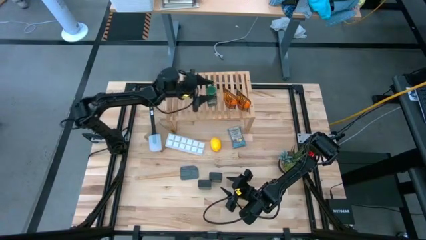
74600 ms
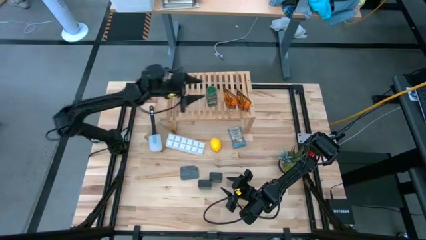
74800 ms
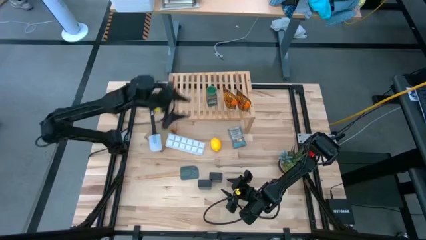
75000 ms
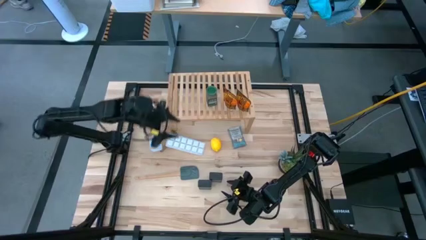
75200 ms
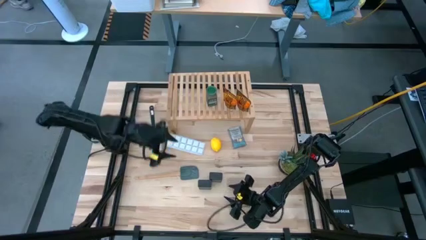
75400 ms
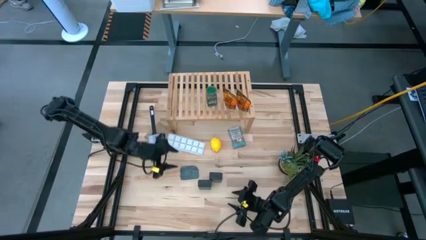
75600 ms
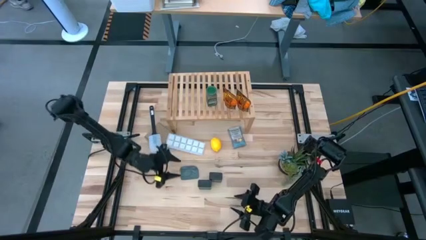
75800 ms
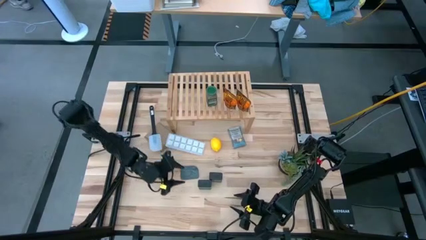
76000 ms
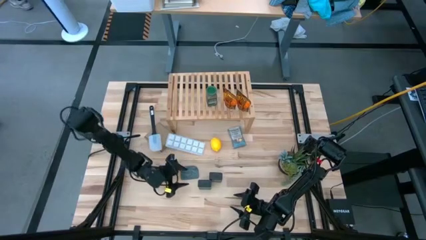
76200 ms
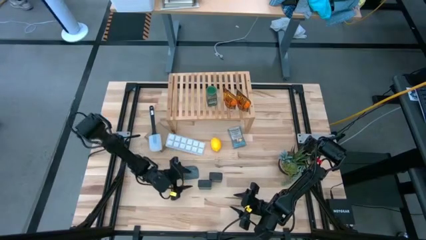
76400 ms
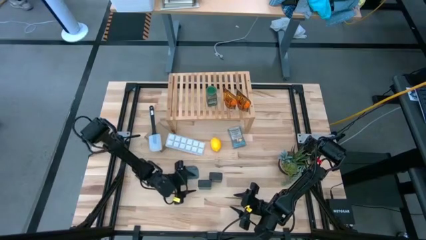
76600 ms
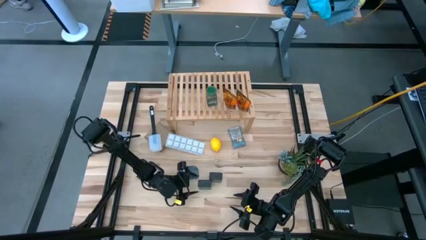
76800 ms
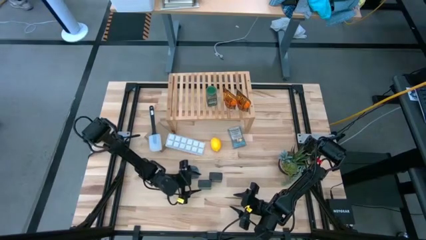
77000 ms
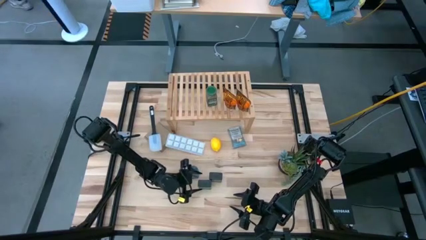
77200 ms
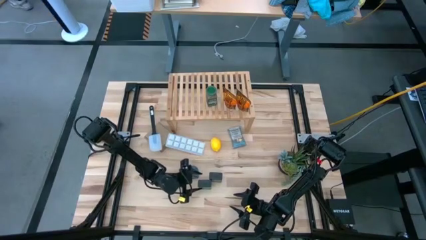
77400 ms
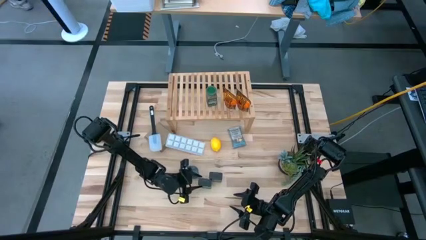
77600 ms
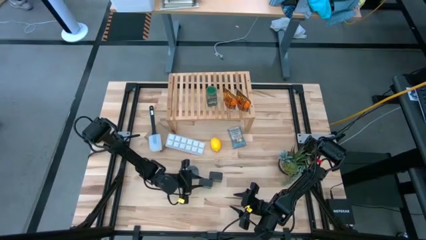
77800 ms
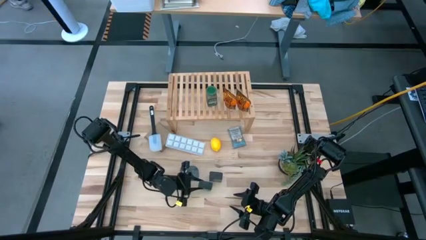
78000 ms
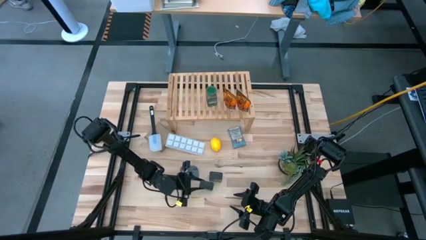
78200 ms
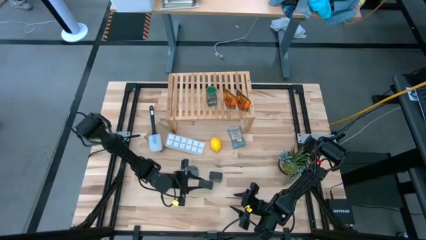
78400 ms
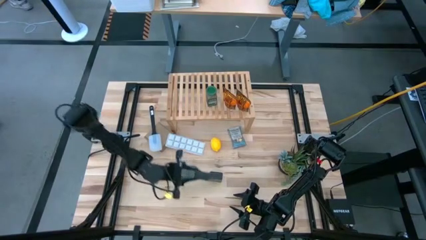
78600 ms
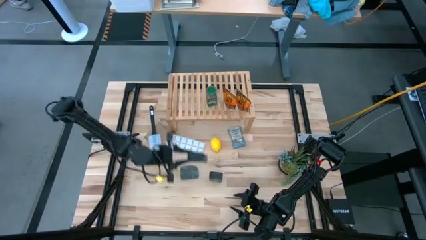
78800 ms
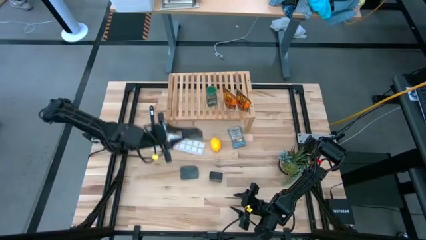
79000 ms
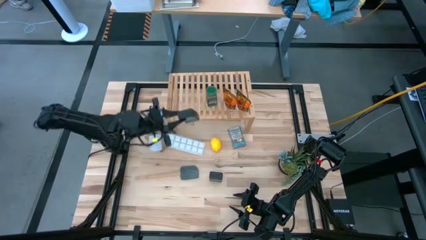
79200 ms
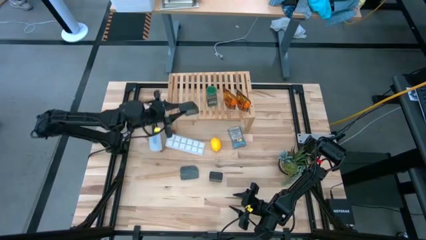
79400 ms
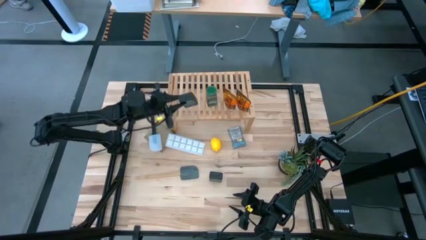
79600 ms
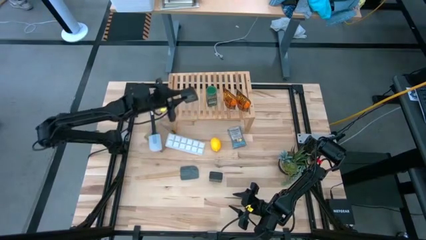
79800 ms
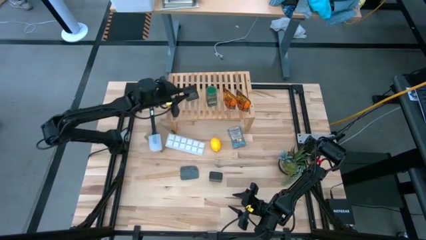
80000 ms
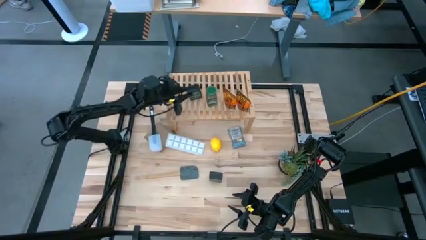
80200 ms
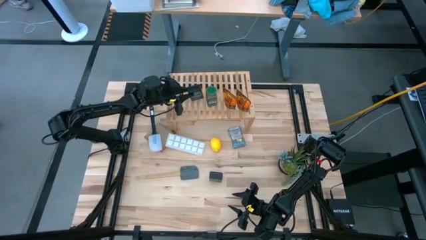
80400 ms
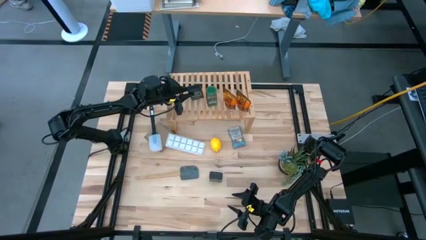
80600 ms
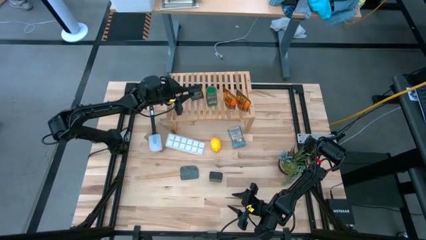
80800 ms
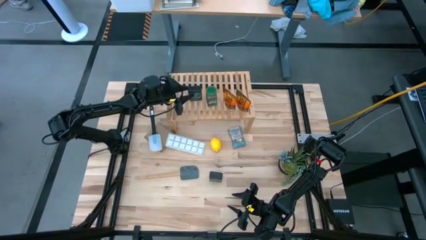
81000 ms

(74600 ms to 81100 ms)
Task: Shelf spices
Put the left green seasoning container on the shelf

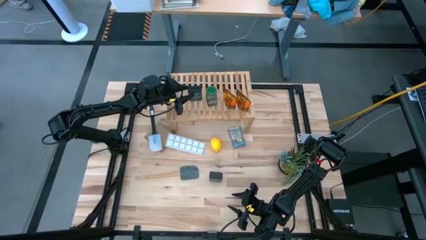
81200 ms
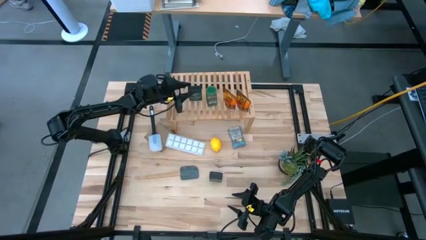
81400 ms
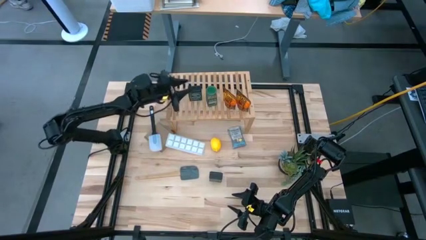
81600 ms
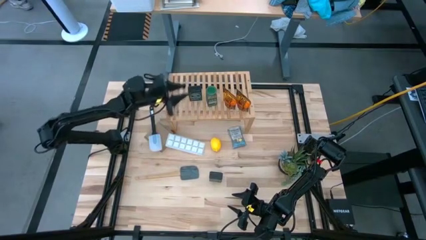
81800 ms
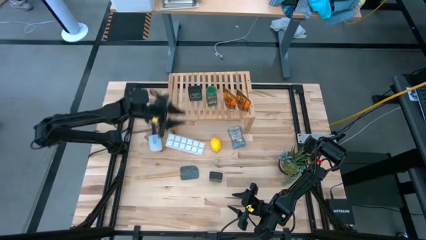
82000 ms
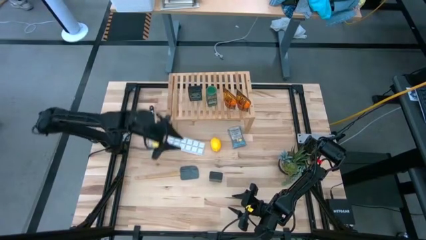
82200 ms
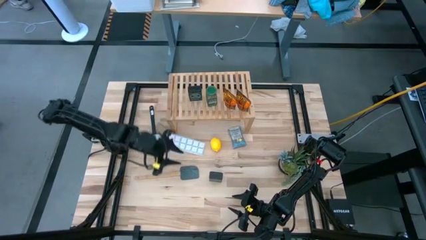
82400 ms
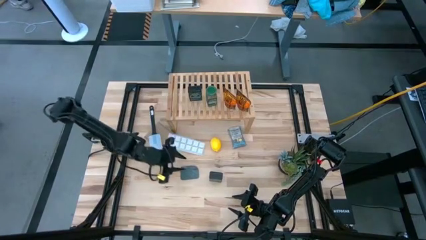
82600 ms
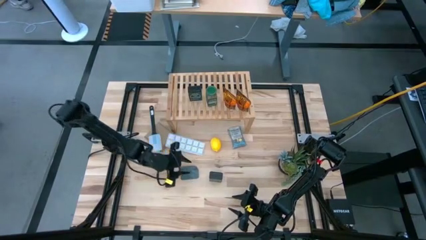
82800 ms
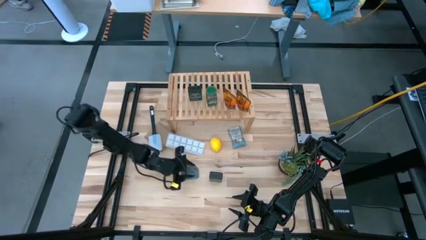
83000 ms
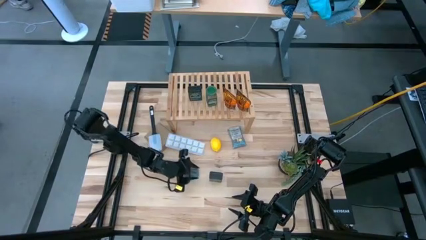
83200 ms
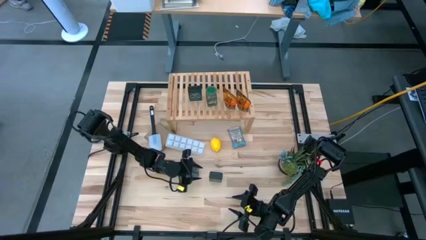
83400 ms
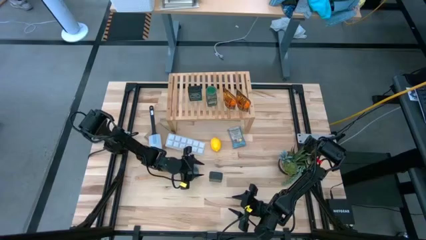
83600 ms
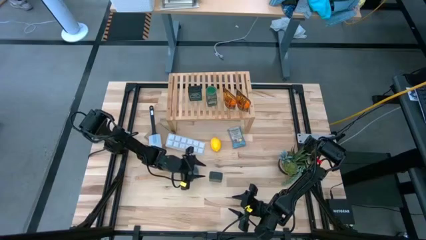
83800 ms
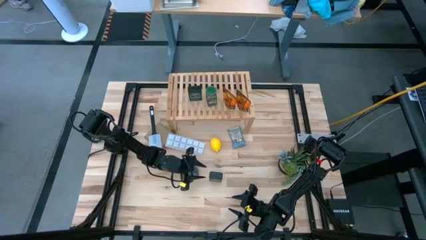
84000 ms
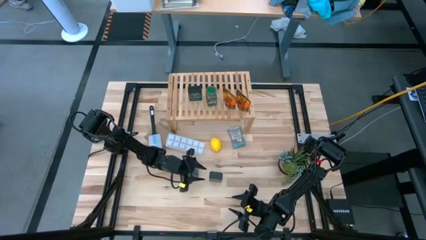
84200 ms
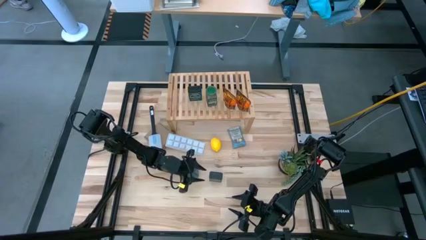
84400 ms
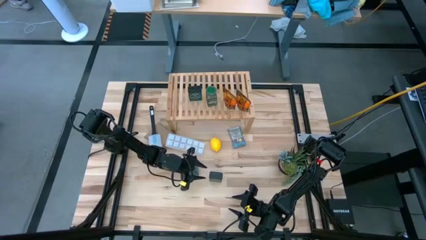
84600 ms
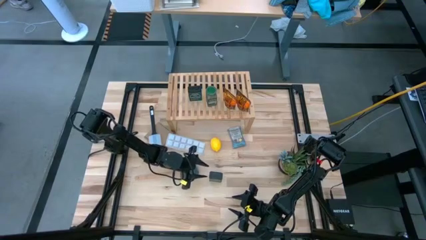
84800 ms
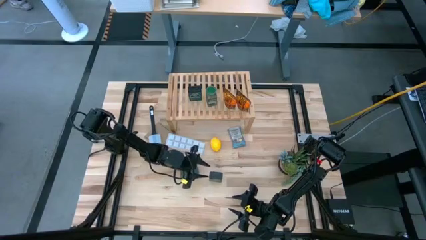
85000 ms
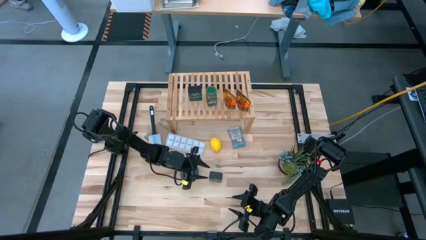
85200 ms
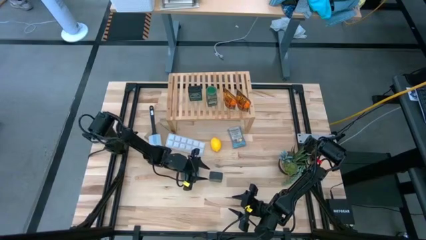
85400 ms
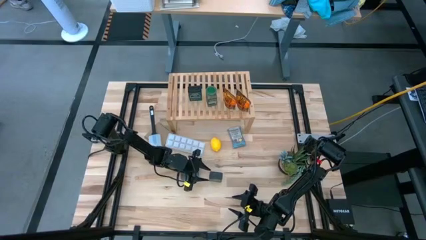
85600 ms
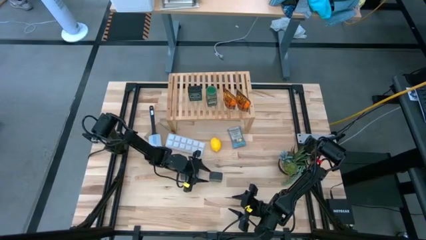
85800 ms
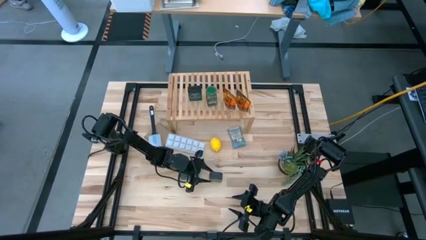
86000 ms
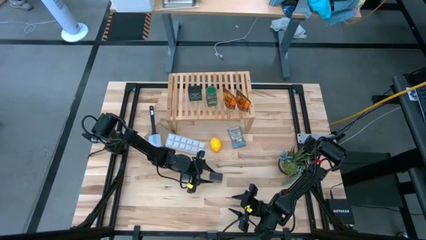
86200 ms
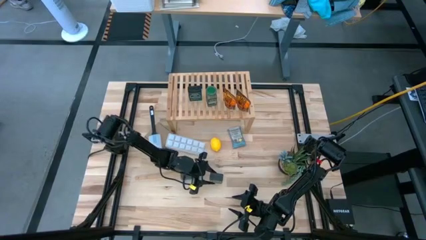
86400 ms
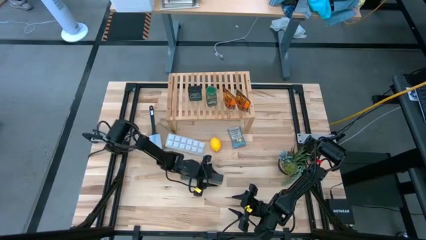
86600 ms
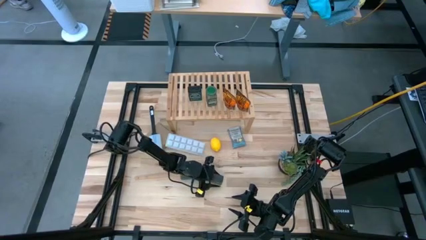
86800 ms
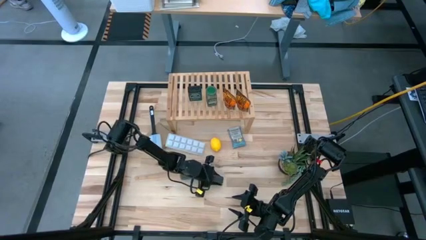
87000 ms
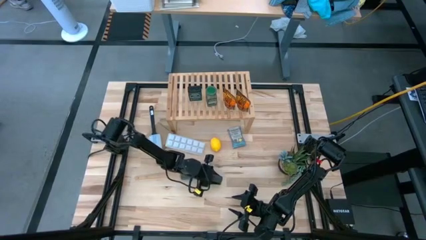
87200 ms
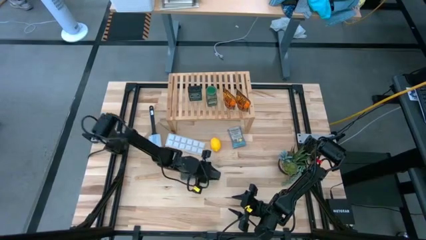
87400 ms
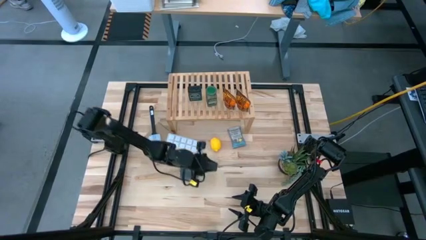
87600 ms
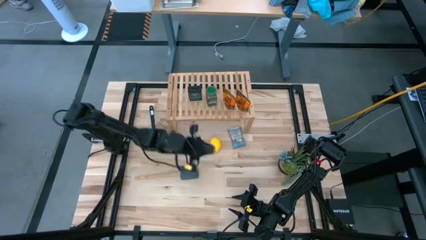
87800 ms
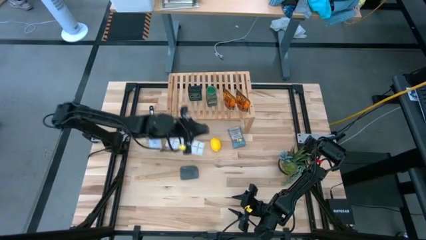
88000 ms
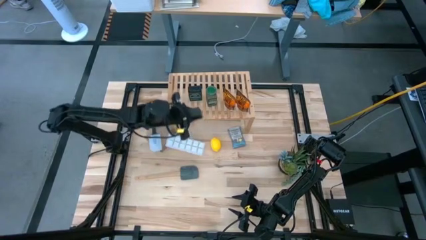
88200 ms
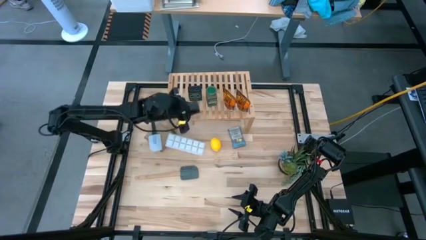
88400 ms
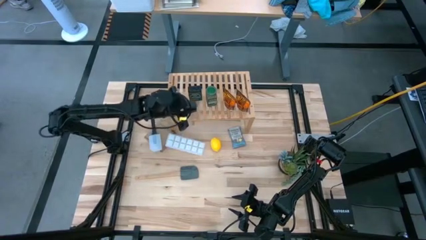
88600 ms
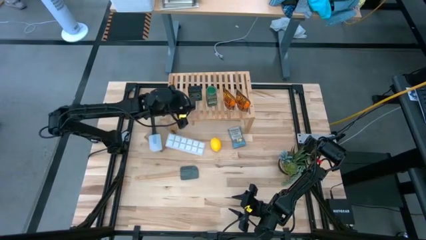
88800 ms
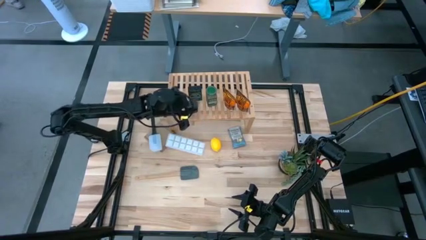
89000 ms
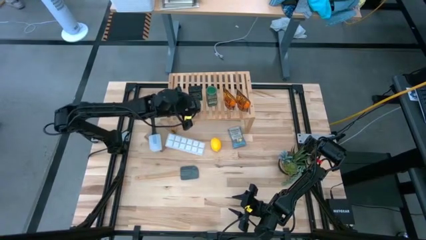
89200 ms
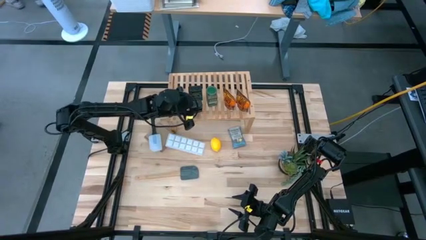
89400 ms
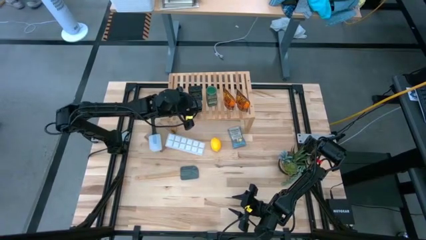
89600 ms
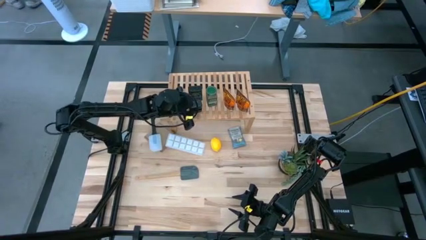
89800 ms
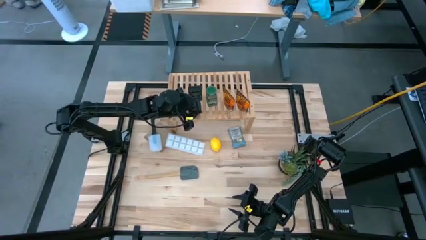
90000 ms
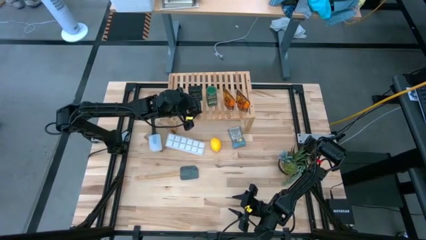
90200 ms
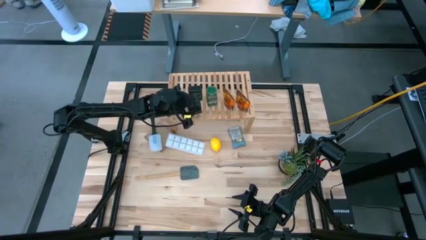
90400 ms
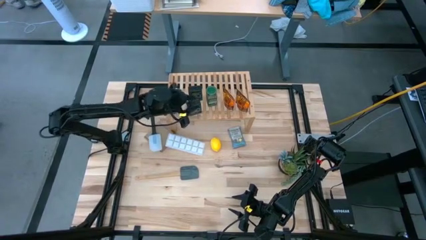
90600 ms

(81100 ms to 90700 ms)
Put the green seasoning container on the shelf
